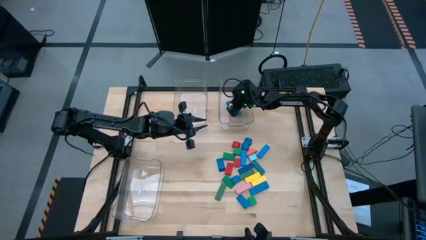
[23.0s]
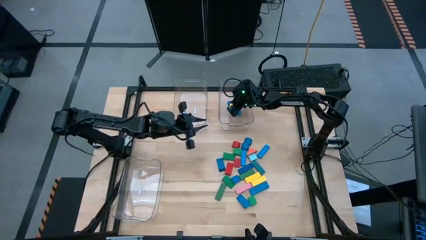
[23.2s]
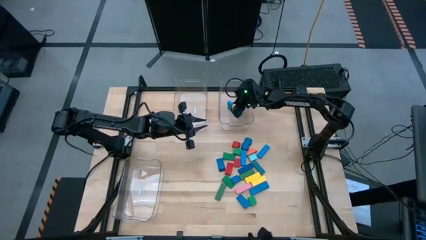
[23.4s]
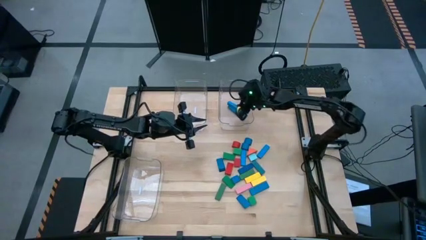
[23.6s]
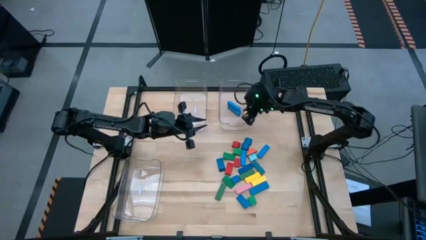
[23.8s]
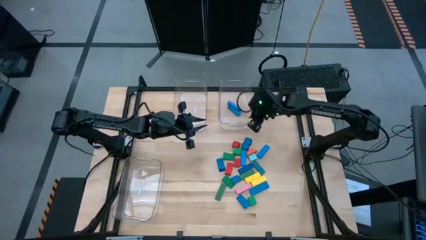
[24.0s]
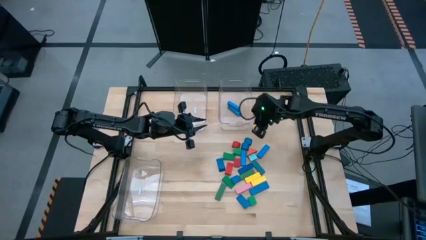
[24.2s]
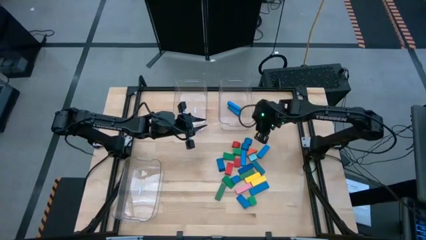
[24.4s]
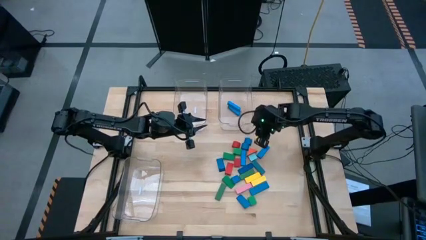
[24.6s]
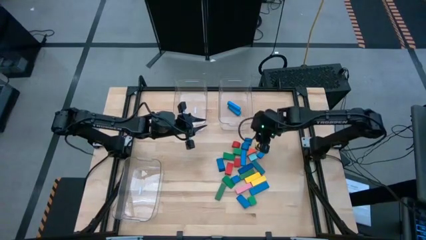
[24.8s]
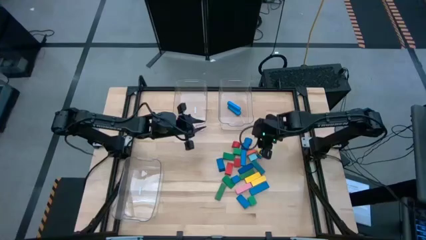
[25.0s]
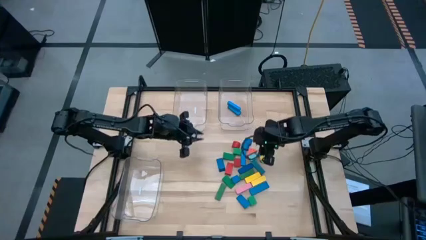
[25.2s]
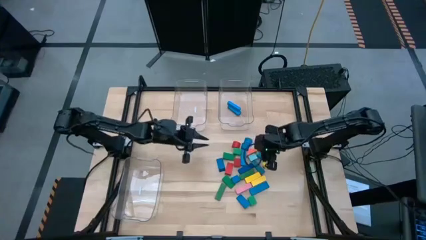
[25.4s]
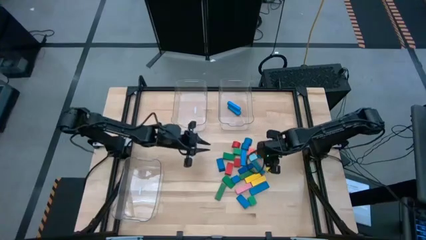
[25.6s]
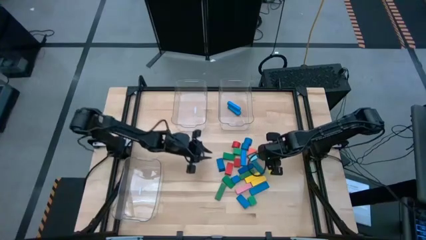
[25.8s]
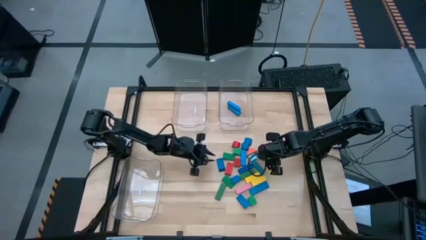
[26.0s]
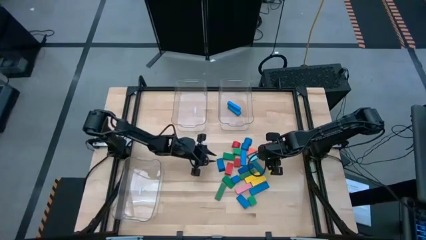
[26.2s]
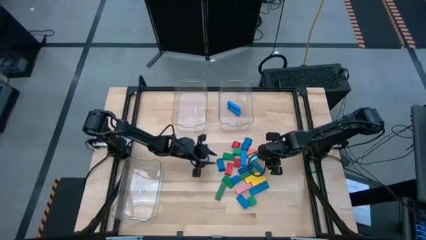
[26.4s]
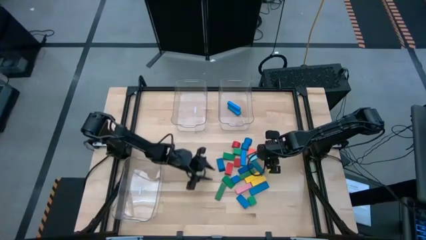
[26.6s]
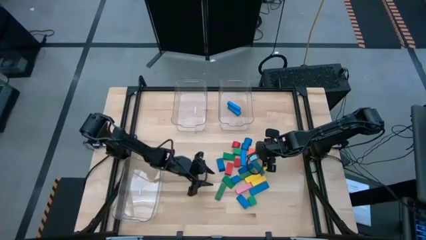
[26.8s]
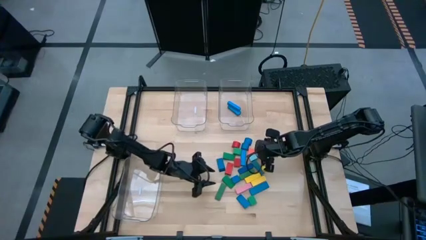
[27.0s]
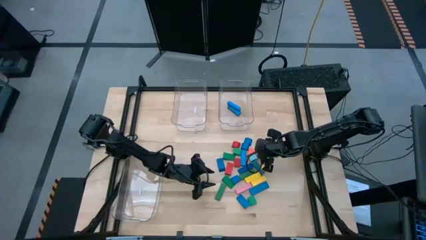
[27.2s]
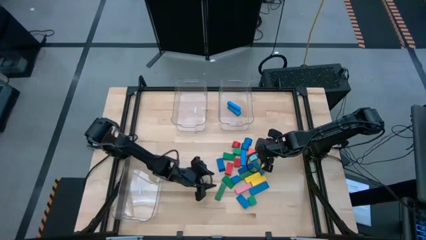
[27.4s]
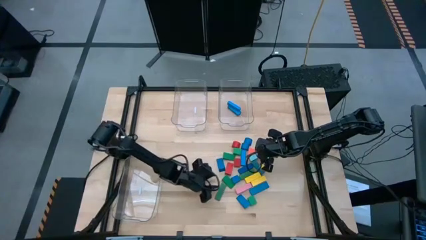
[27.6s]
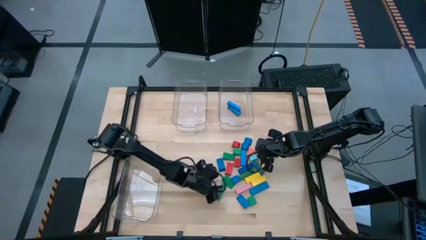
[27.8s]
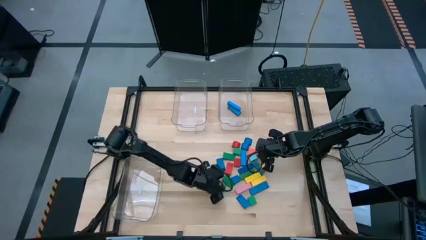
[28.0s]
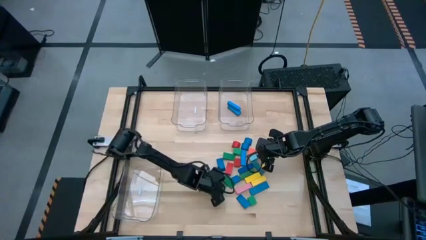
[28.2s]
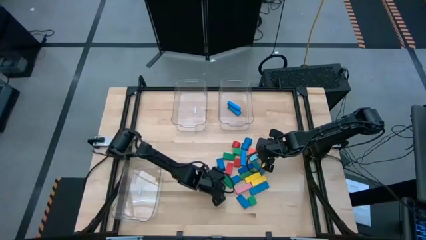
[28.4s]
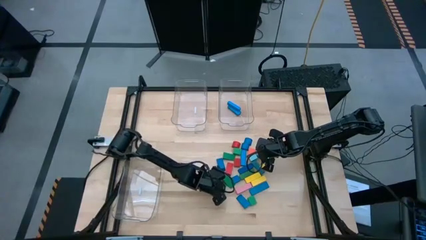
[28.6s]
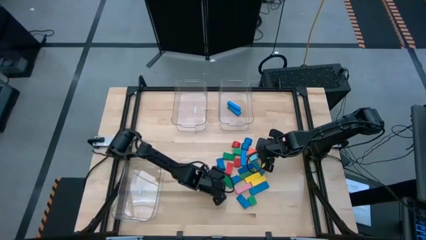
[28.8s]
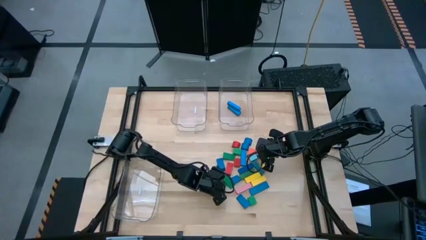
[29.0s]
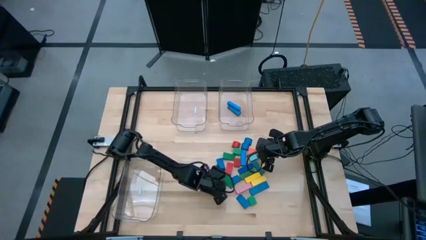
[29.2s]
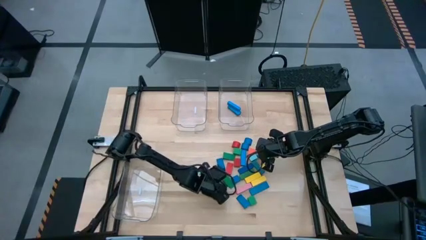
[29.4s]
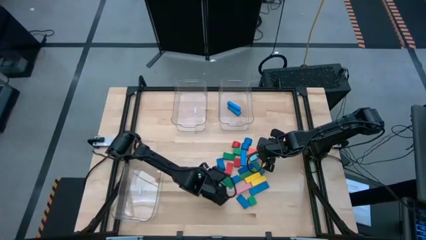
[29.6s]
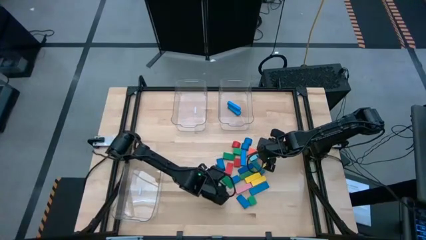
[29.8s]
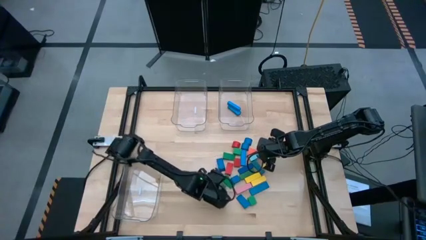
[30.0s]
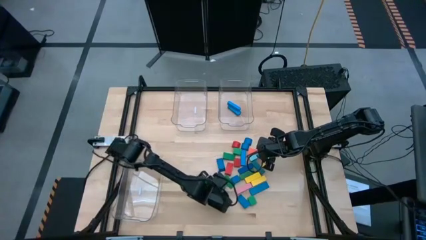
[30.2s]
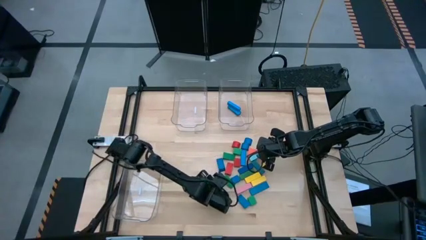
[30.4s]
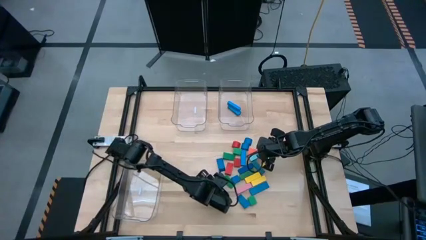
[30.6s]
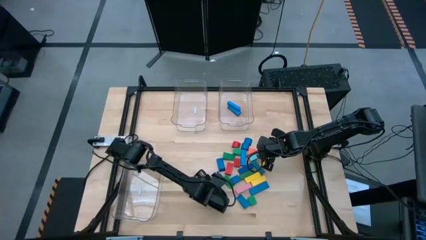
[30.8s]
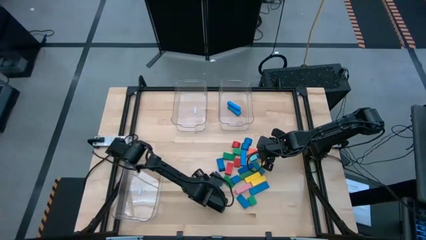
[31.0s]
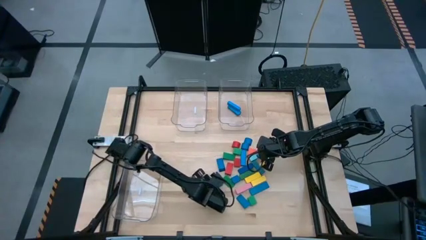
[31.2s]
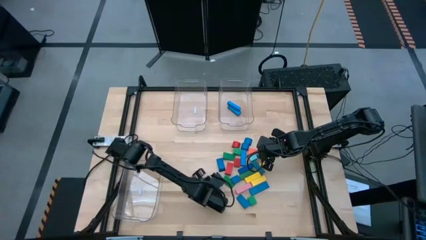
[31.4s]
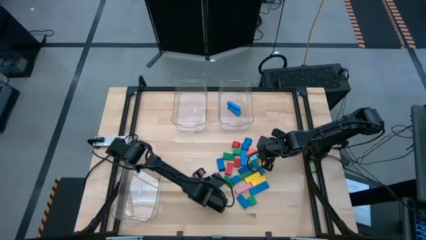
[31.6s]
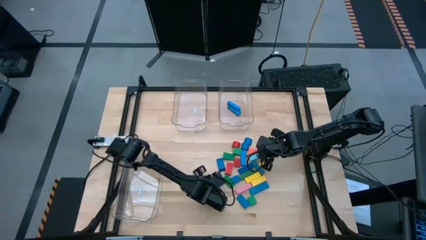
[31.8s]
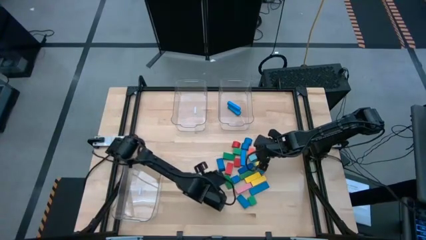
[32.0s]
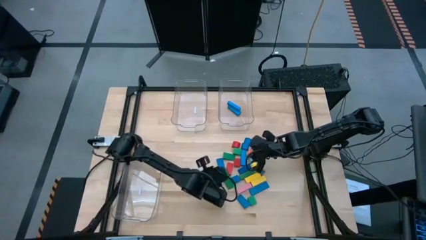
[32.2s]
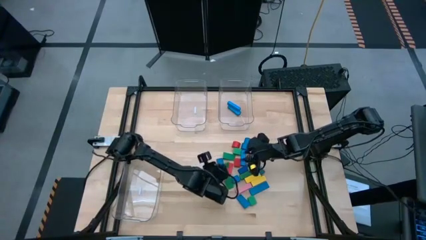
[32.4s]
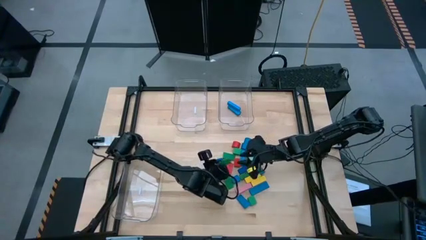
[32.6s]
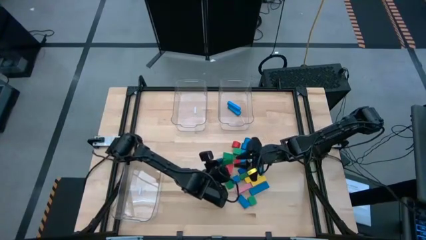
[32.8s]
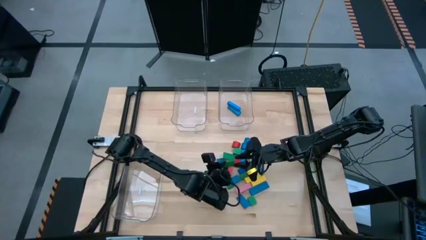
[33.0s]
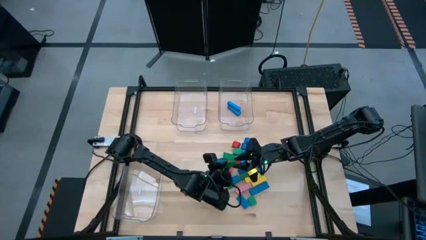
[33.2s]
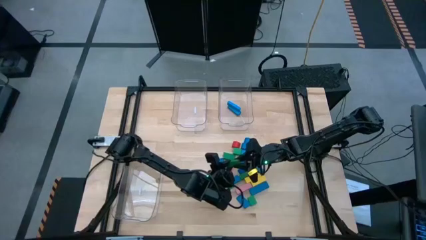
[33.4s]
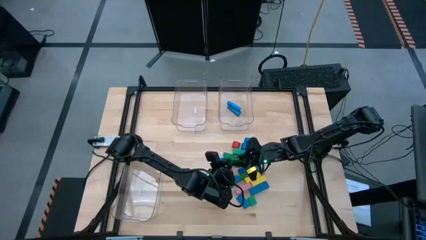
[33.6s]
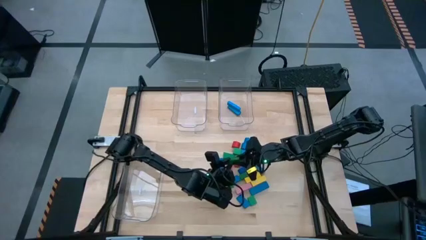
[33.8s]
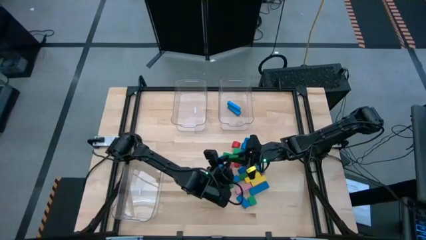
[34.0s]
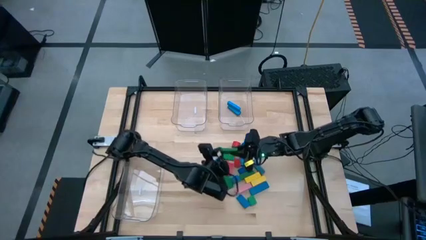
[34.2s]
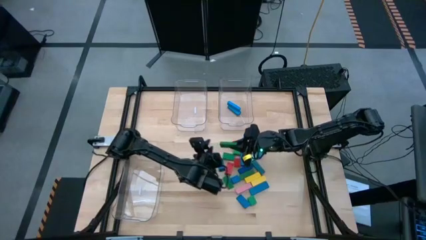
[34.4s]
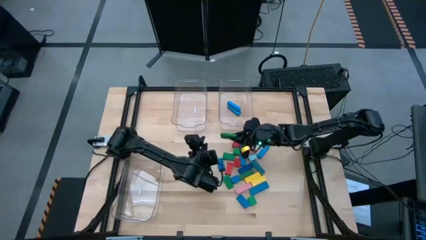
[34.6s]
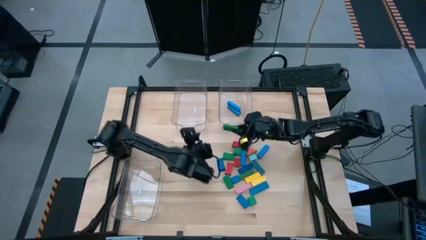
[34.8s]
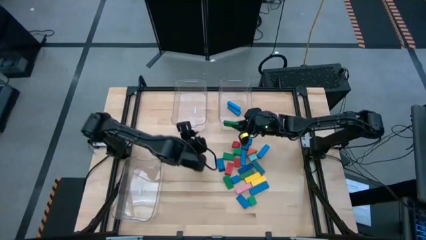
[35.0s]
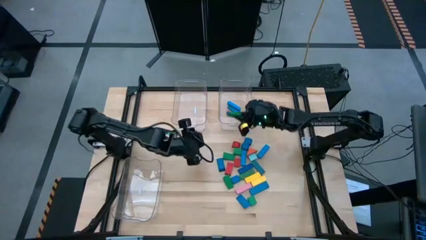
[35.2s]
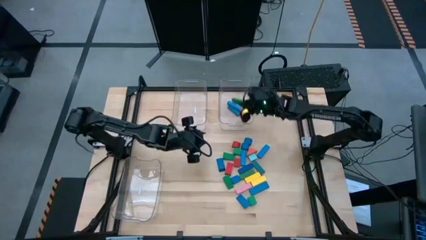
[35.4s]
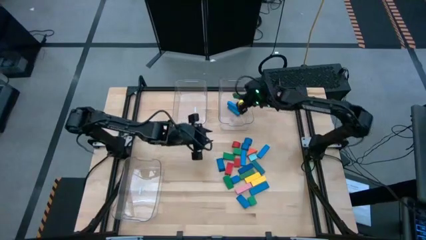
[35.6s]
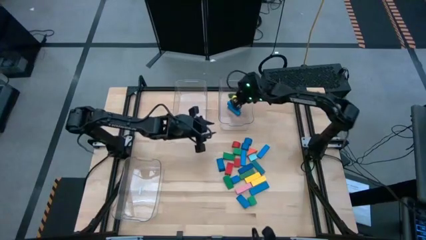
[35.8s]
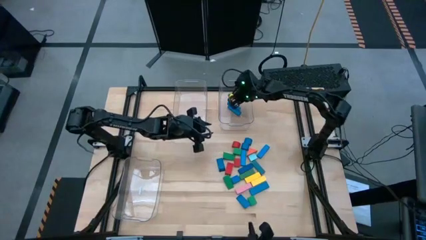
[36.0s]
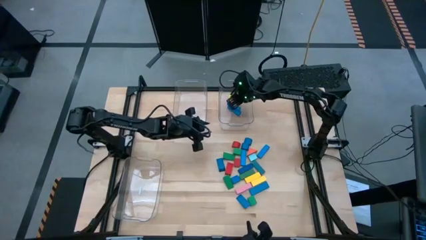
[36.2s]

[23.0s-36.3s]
Task: Sort blocks by size
Put the green rectangular block into the top right transparent bin
